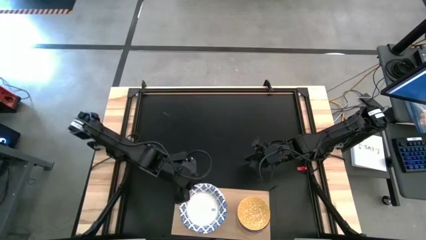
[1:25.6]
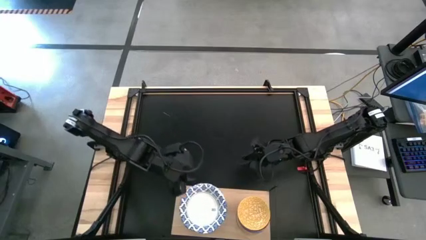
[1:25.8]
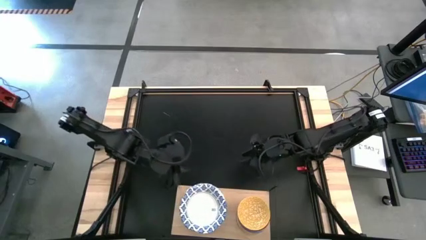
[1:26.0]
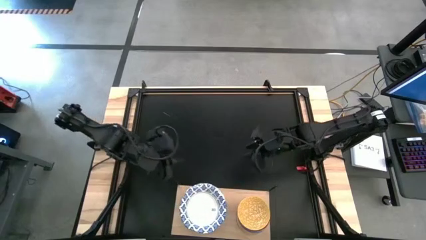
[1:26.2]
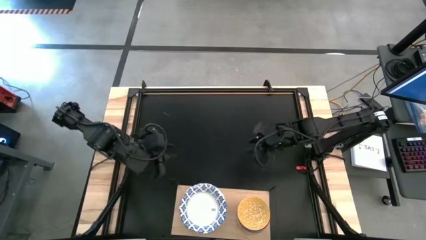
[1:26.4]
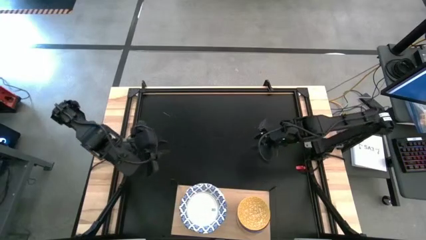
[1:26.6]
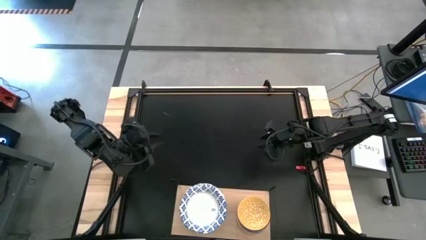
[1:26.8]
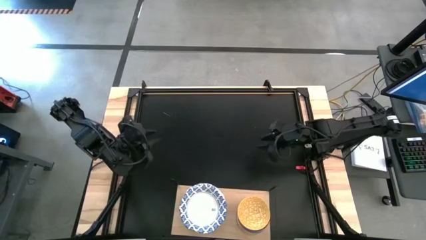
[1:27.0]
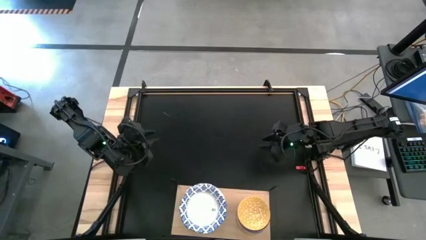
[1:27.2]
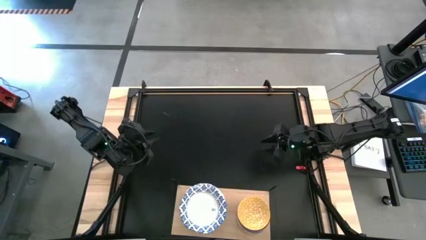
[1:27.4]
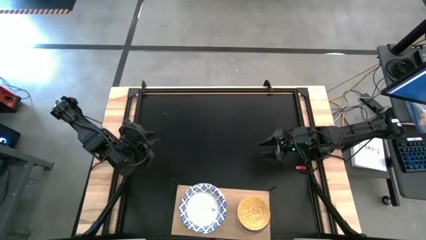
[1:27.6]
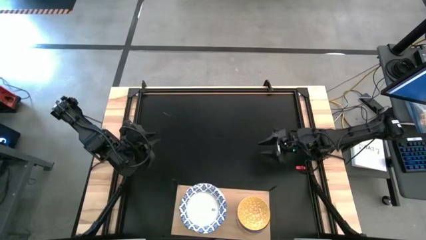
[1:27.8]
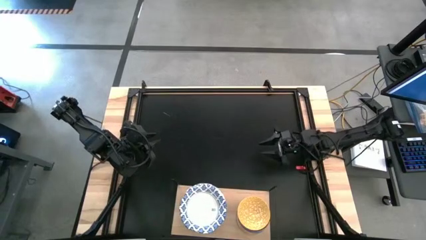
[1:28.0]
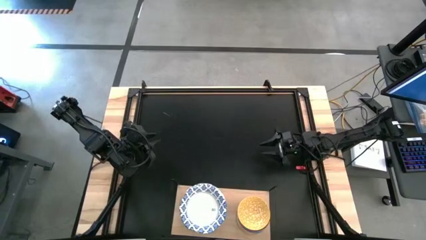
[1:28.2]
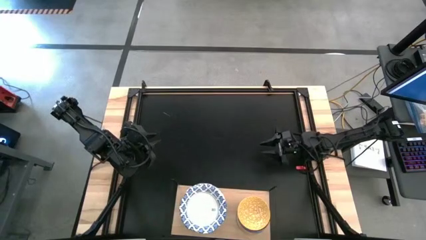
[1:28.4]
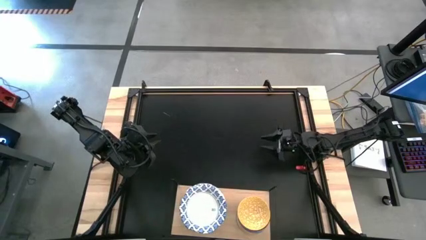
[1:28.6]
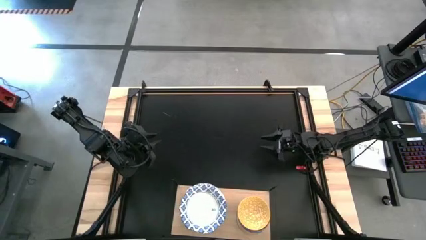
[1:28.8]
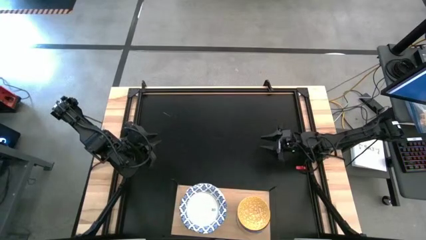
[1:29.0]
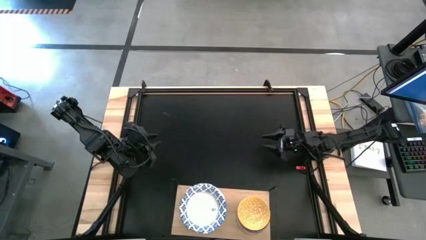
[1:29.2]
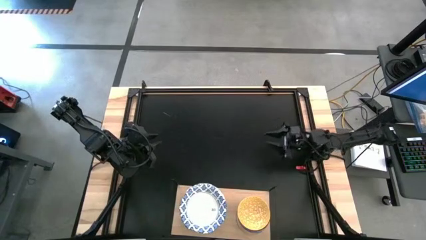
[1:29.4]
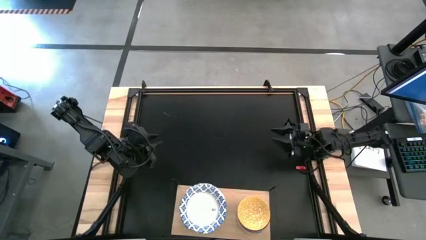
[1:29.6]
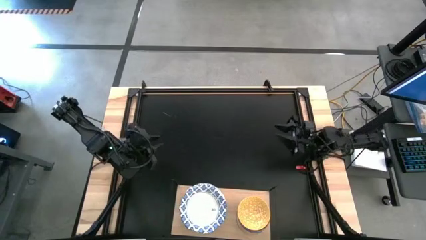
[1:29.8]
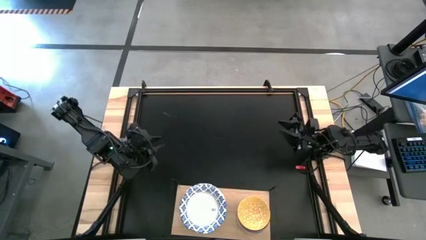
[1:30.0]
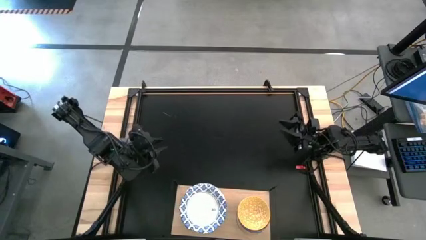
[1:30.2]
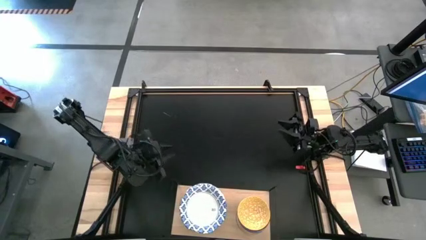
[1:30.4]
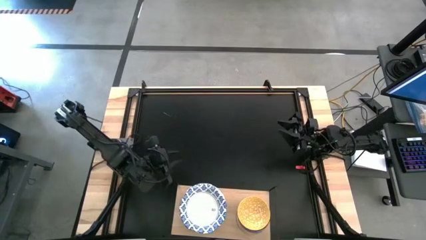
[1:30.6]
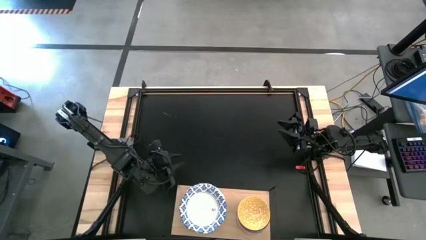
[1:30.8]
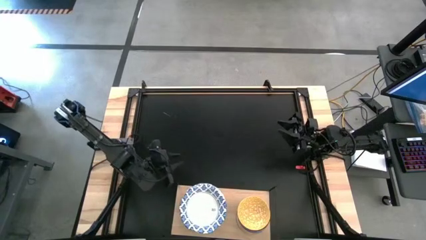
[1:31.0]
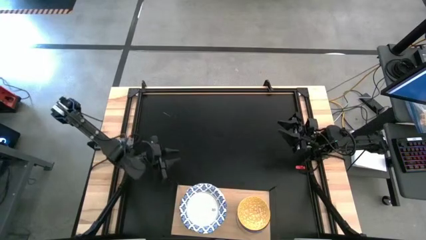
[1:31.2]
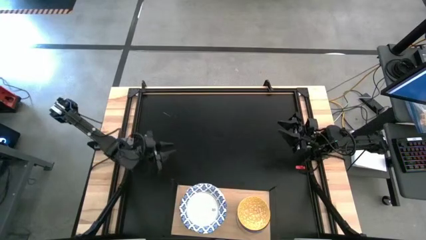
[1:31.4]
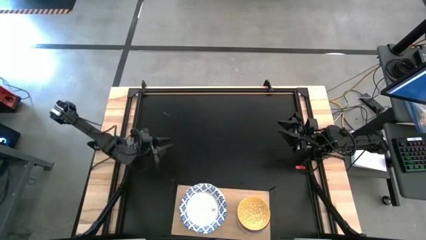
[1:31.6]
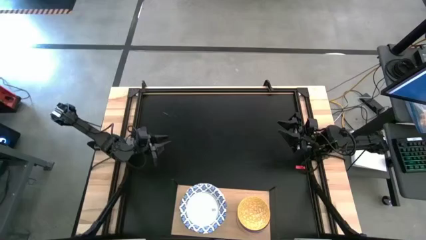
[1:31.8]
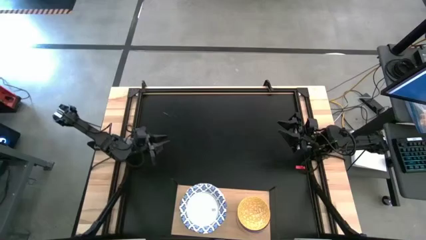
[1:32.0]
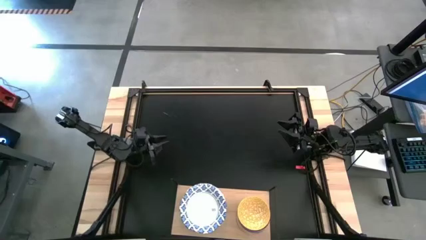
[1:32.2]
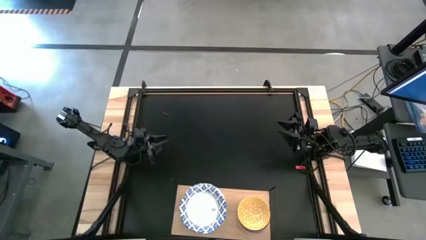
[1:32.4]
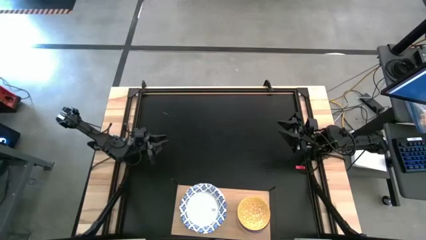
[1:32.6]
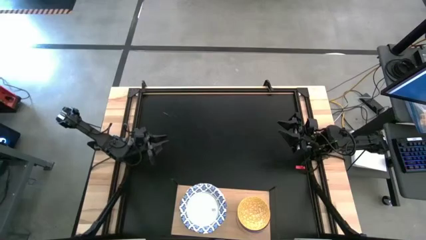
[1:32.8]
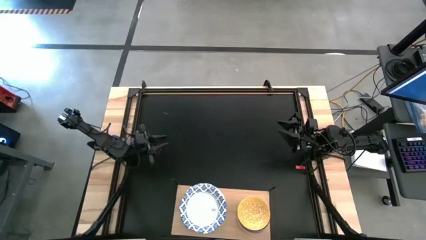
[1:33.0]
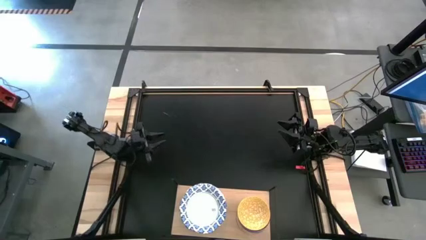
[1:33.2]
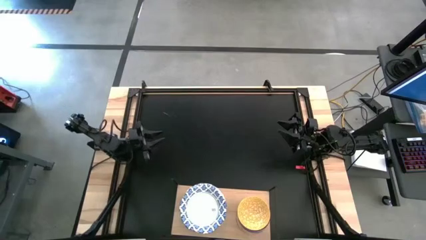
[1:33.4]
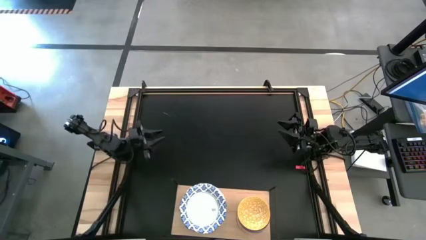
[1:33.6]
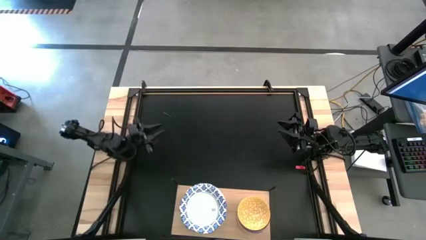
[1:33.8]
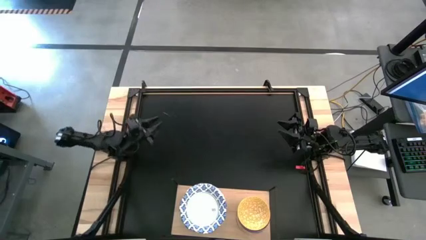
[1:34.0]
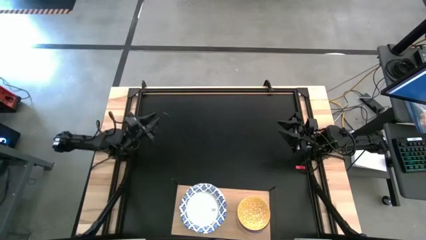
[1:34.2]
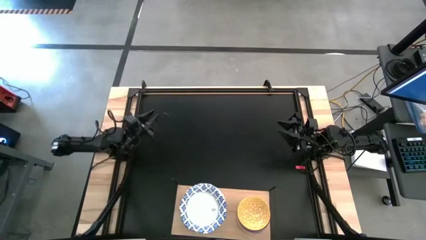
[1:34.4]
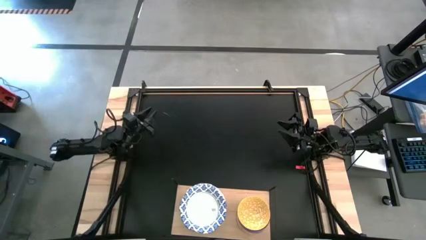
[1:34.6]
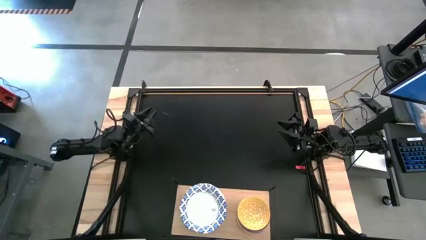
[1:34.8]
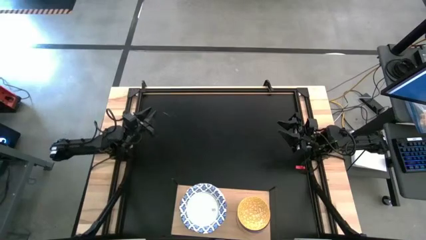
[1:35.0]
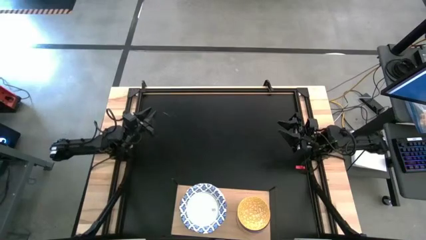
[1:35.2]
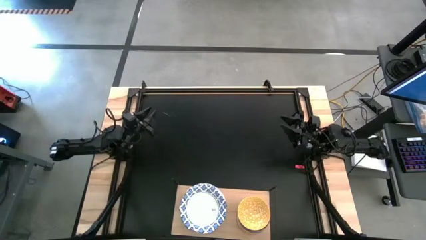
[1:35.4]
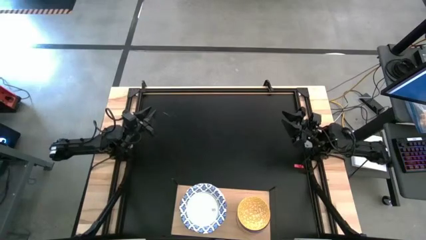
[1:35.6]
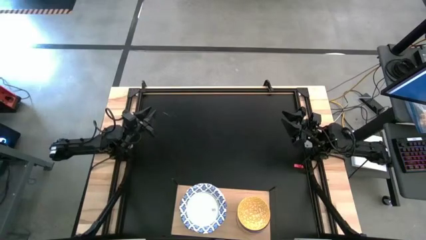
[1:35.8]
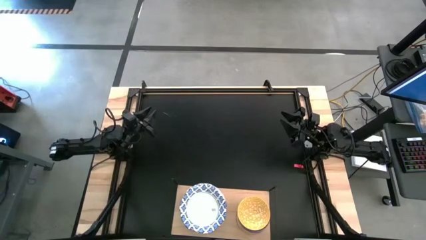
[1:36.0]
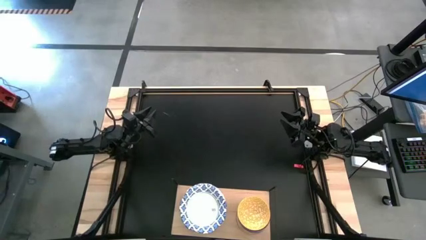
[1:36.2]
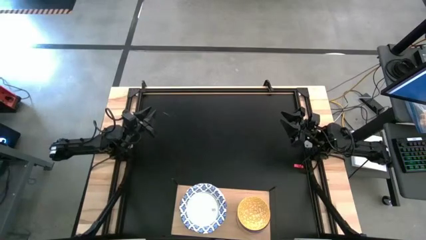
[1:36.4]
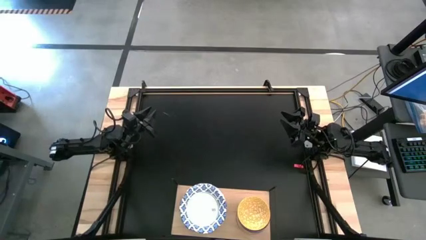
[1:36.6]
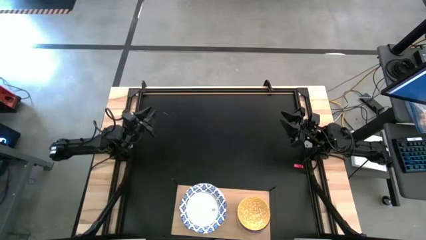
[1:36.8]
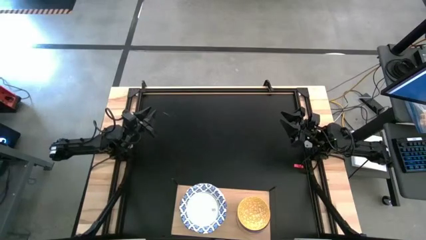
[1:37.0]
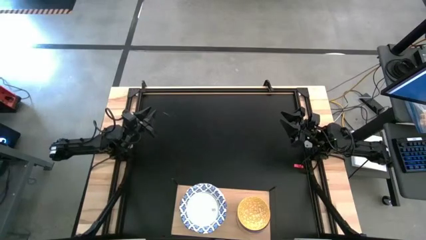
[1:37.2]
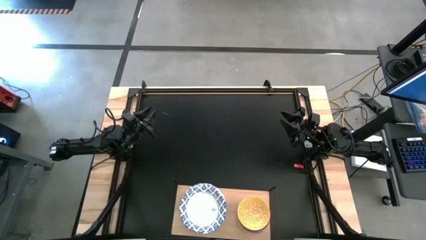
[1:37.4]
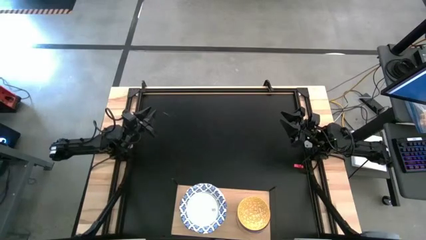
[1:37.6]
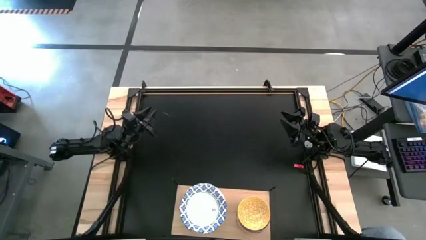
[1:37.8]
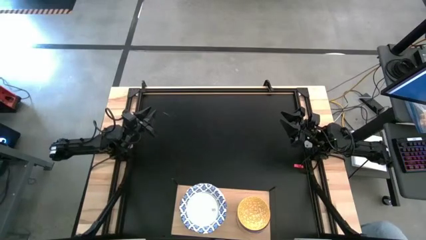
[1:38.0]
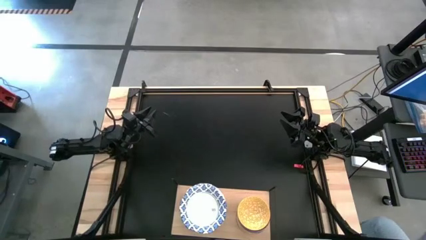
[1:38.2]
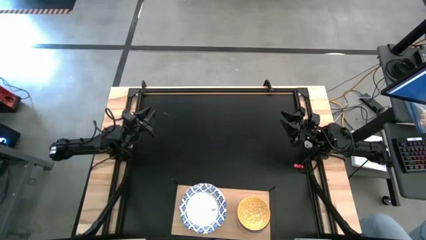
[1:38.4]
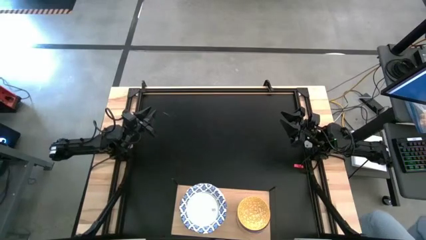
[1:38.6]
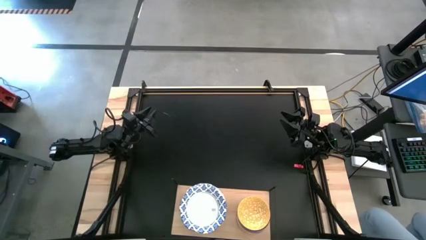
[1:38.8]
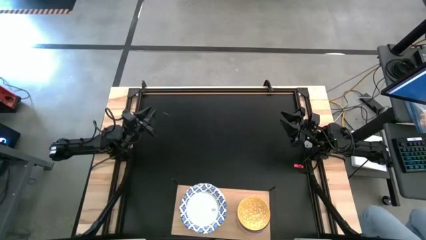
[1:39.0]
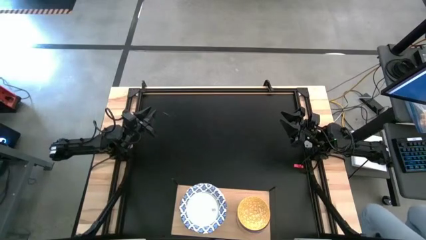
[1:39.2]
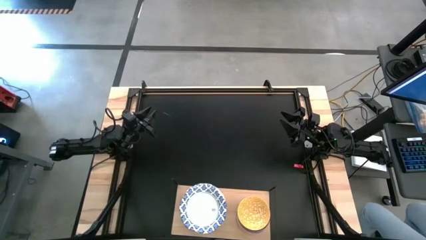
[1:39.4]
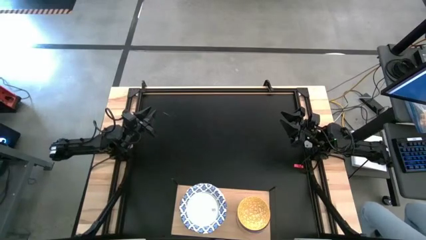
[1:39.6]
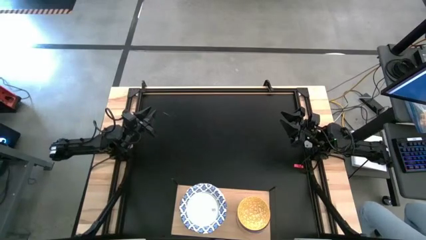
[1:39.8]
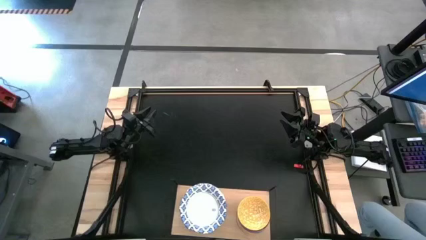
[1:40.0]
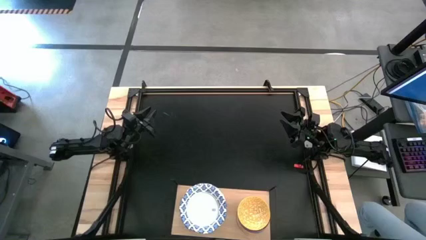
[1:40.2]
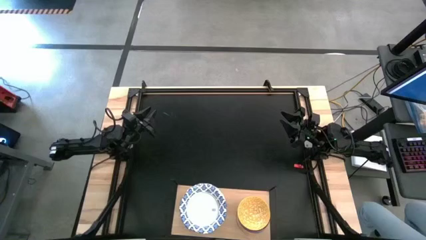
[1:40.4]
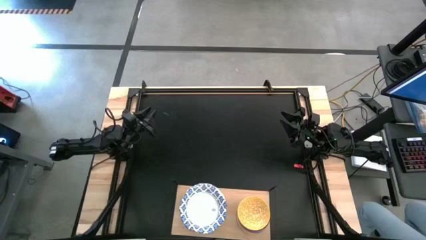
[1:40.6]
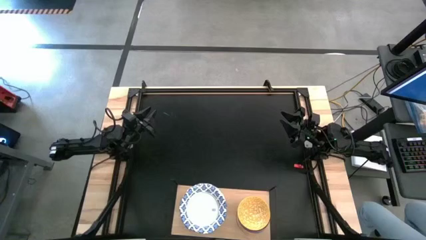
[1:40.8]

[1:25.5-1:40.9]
Task: Place and stack bowls onto a shelf
Return to Home Position
